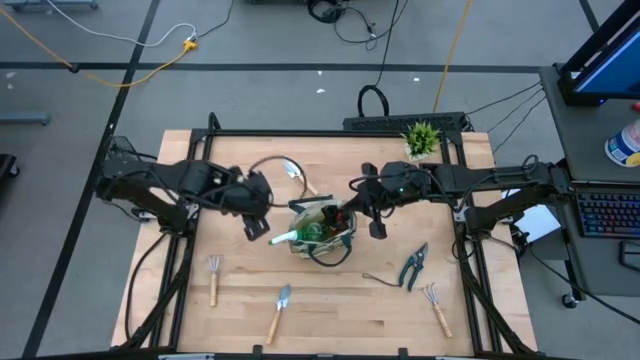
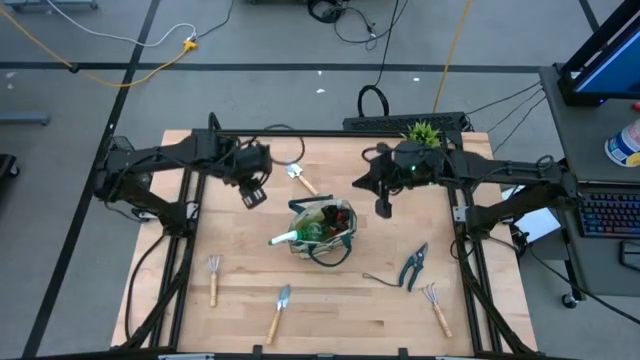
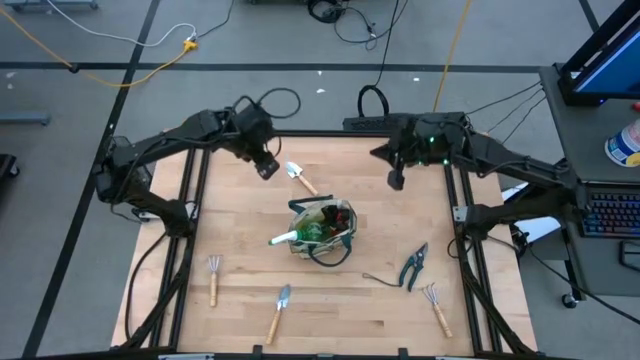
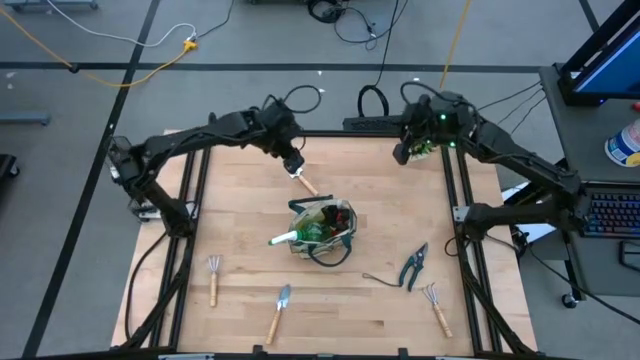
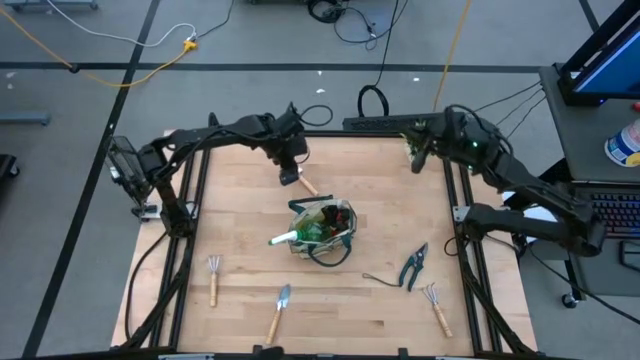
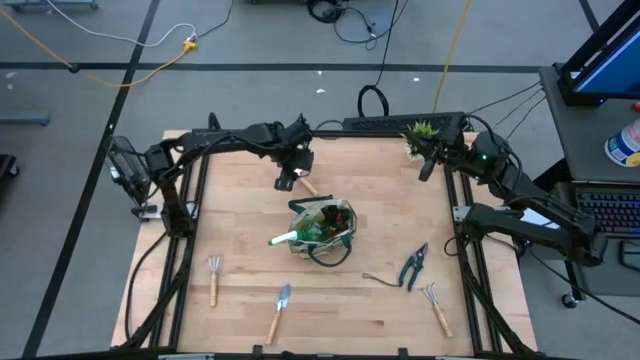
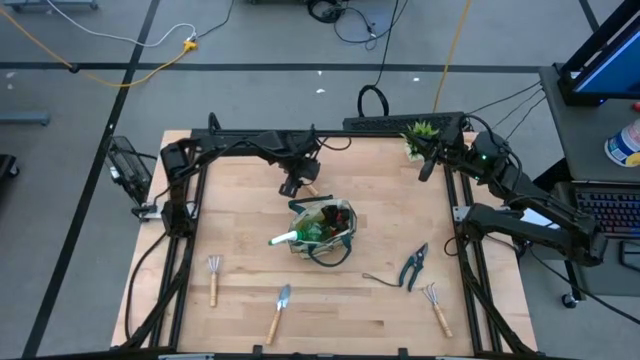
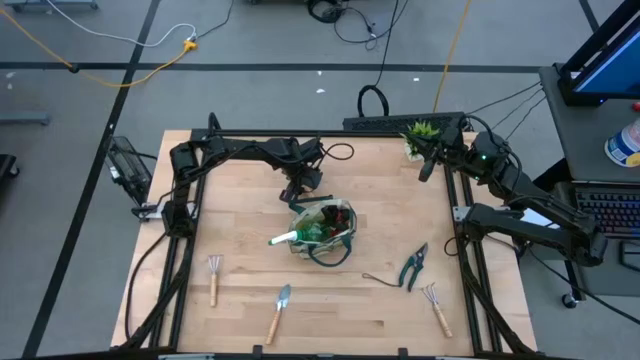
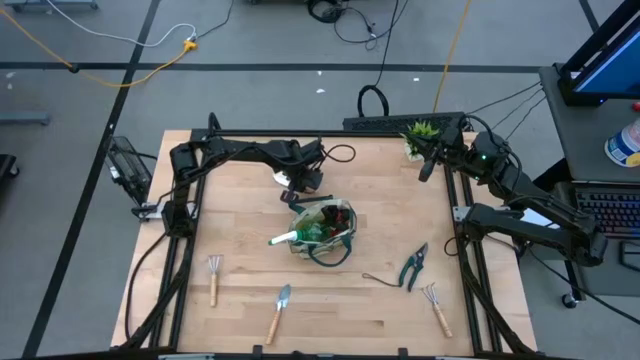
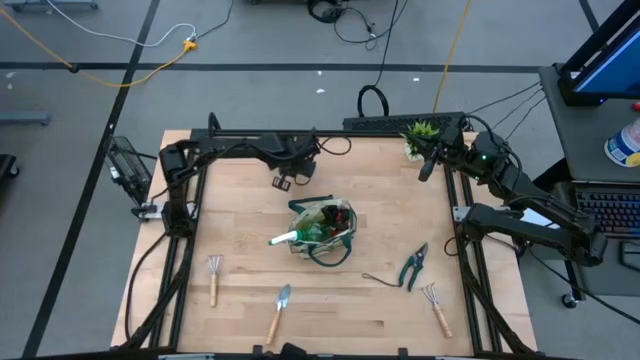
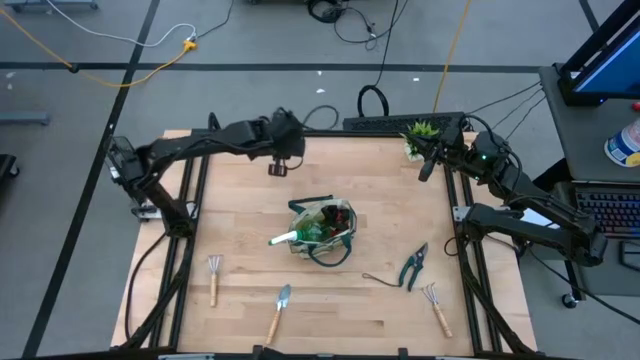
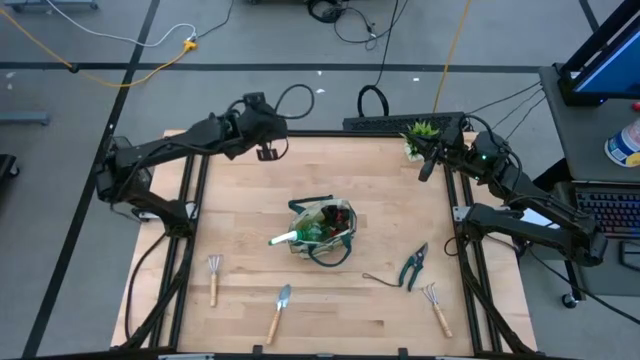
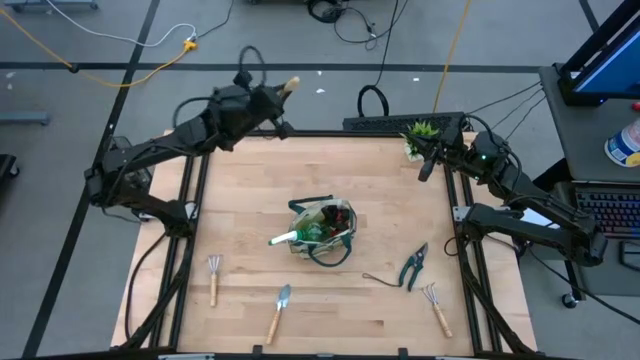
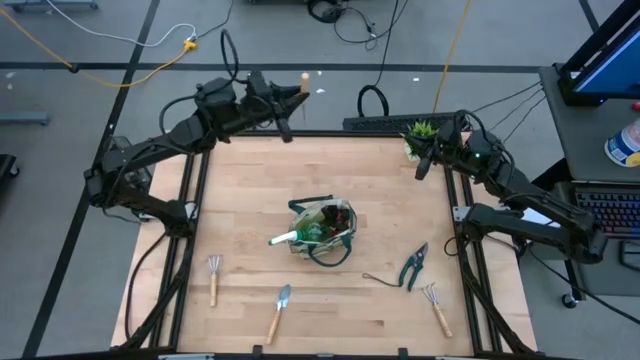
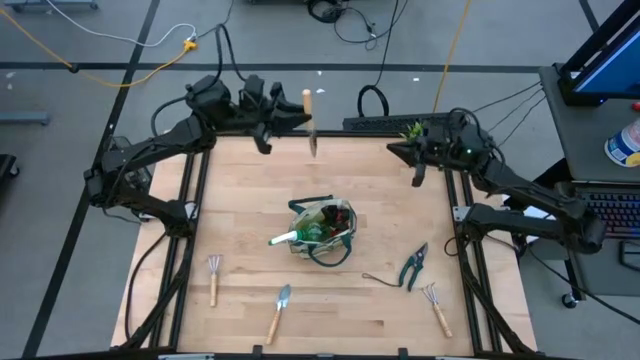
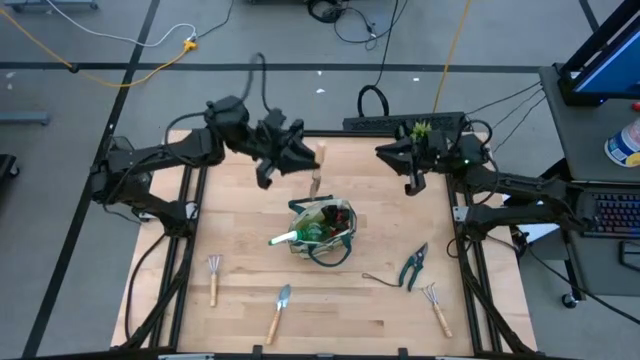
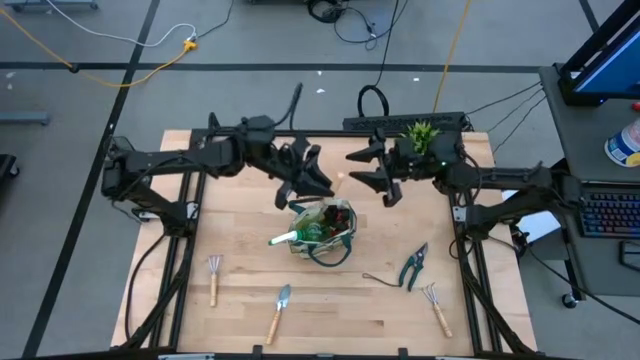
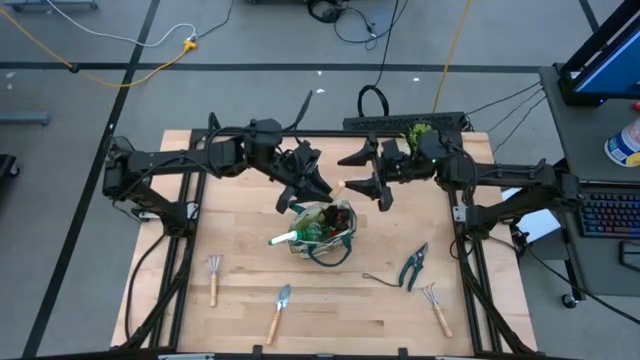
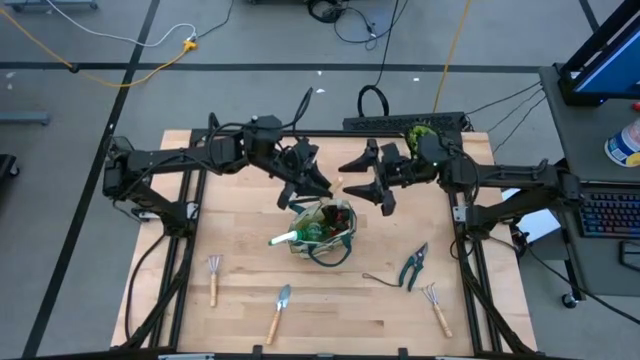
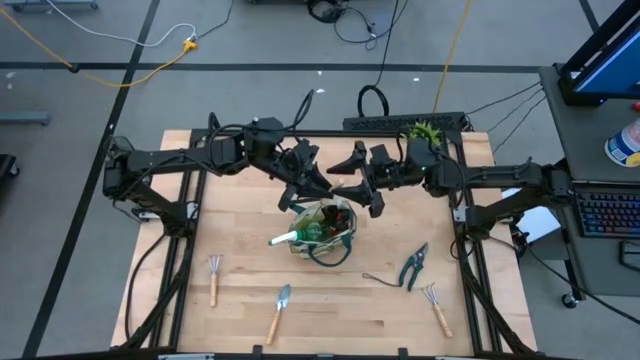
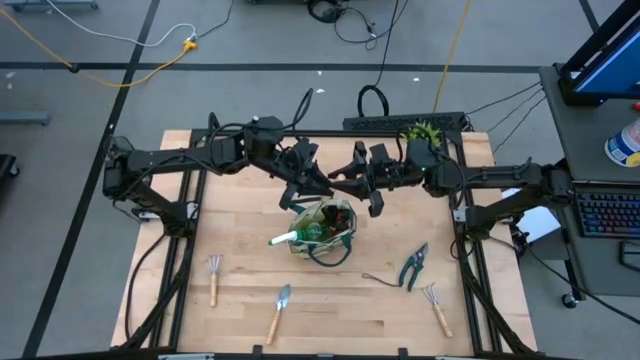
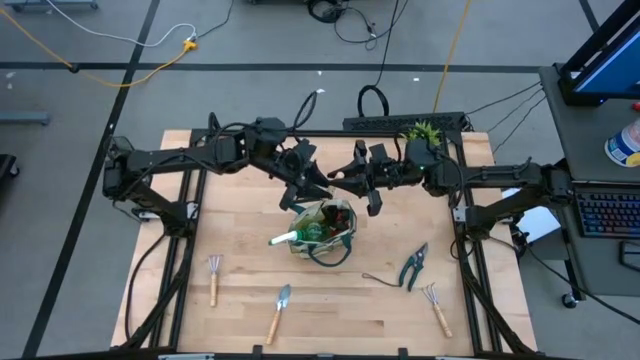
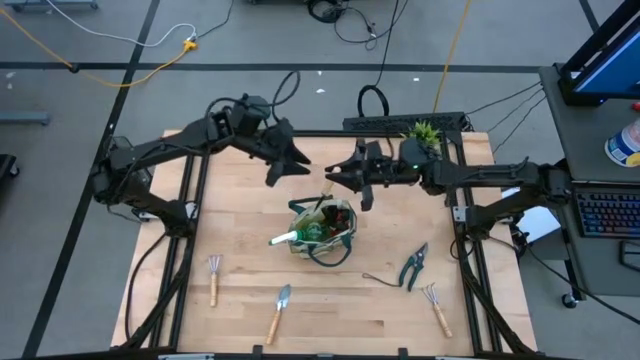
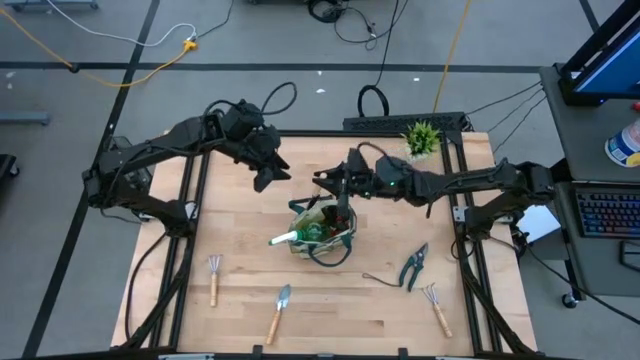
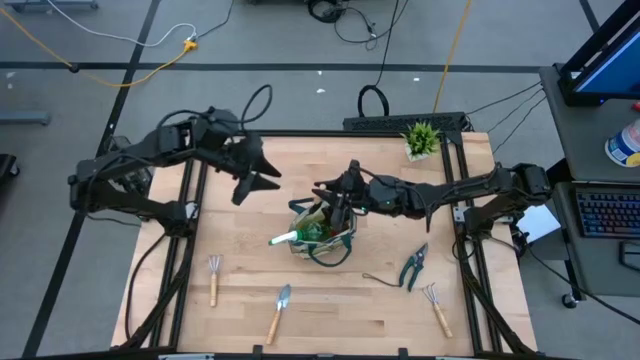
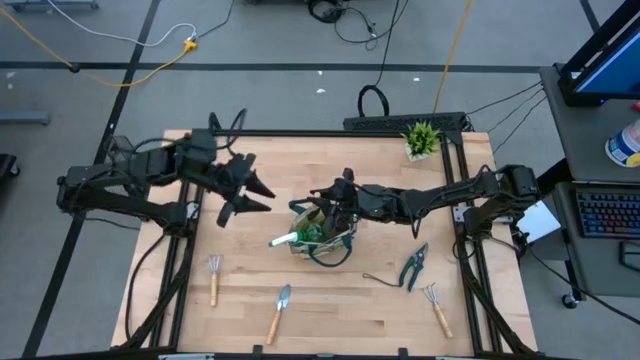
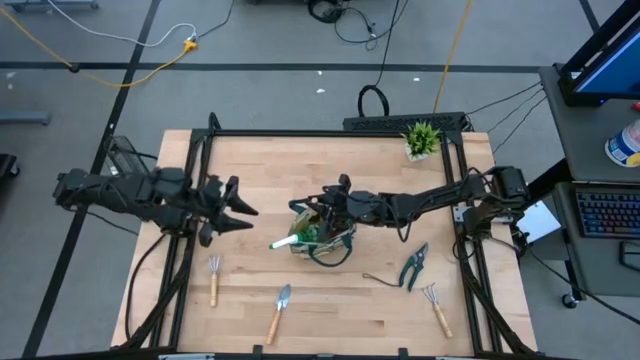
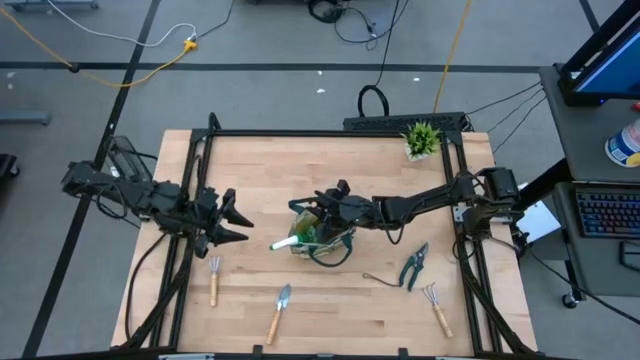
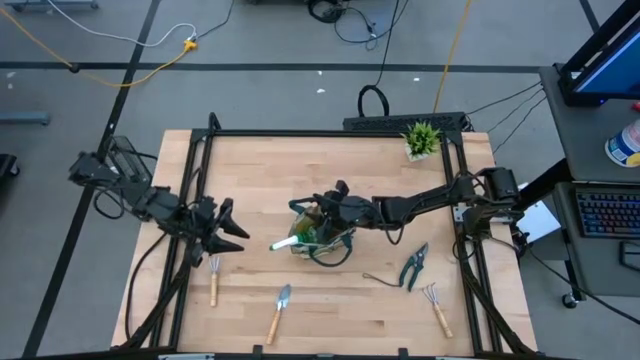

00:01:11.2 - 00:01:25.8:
Task: Pick & Place Garden tools in Gardening bag
Put the top trowel into the gardening bag
